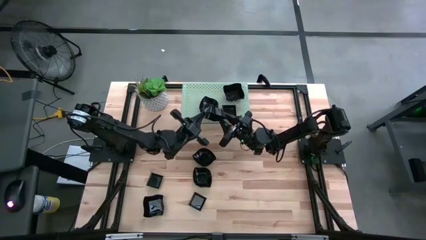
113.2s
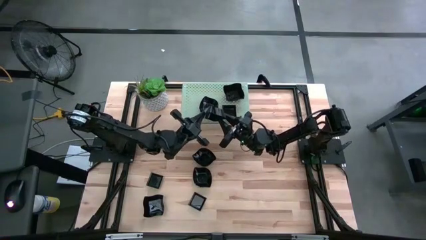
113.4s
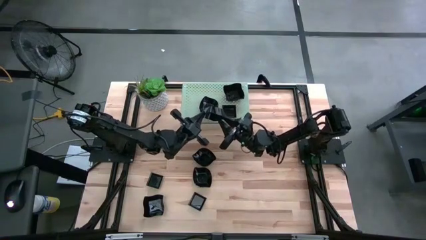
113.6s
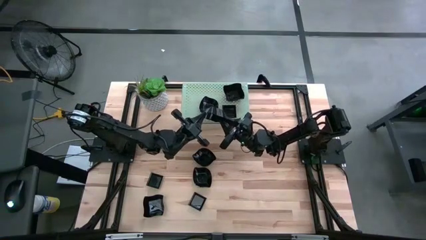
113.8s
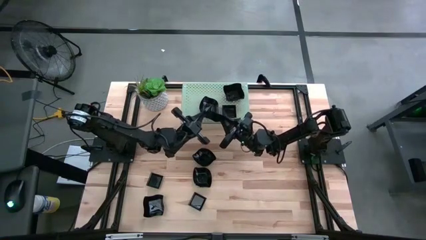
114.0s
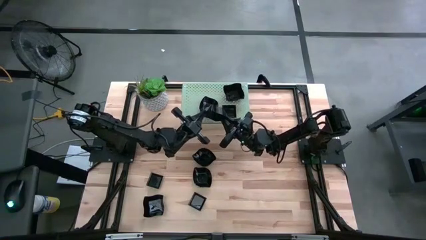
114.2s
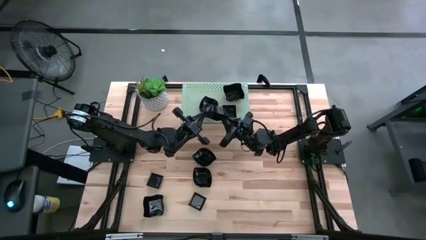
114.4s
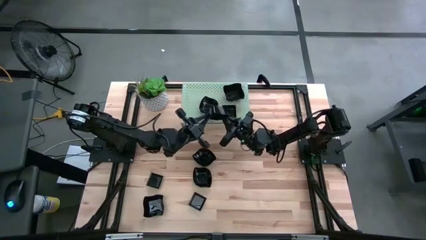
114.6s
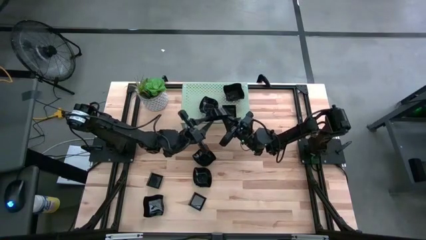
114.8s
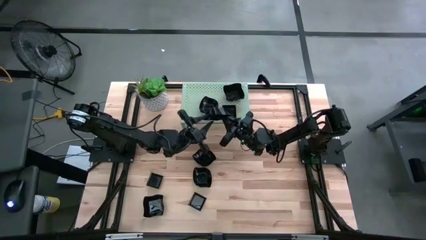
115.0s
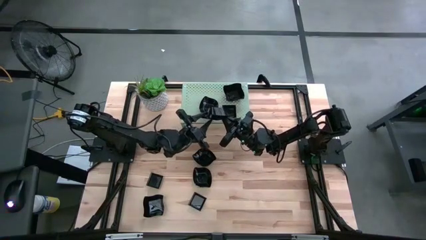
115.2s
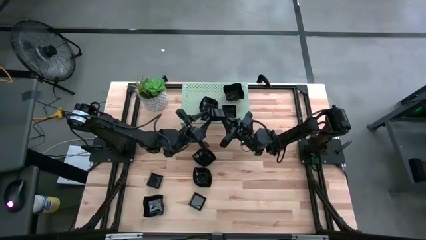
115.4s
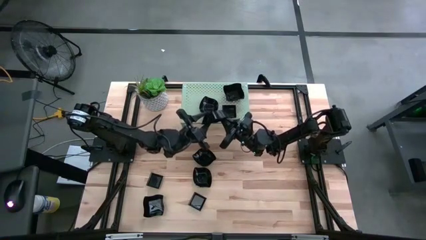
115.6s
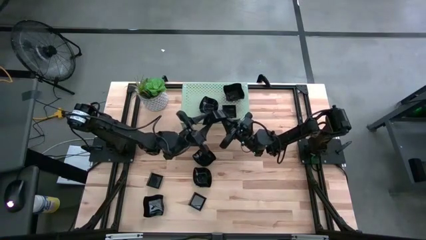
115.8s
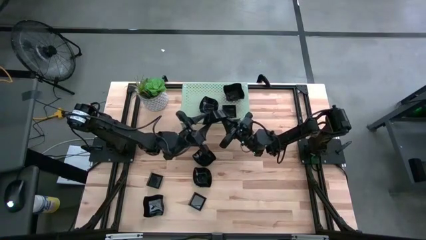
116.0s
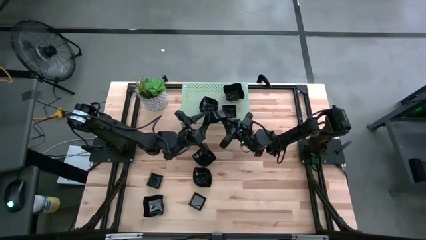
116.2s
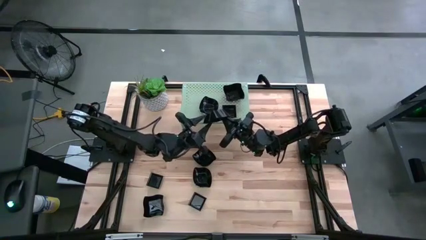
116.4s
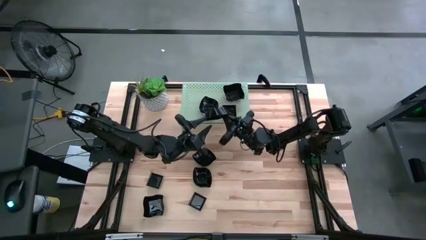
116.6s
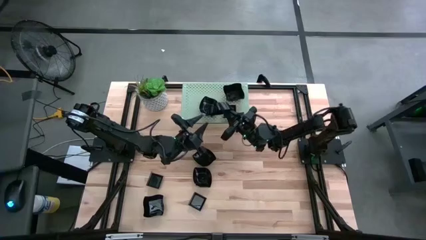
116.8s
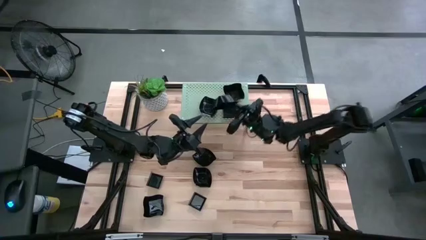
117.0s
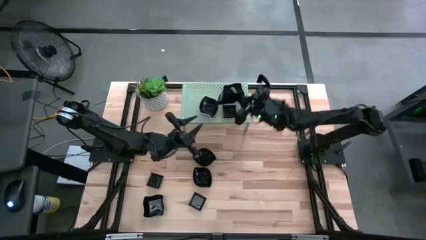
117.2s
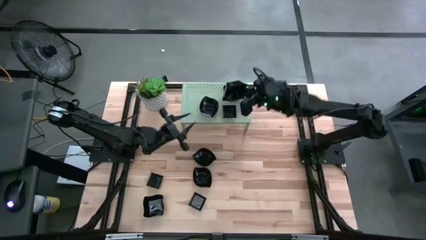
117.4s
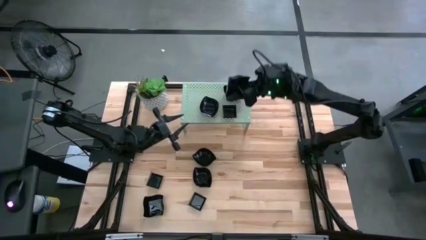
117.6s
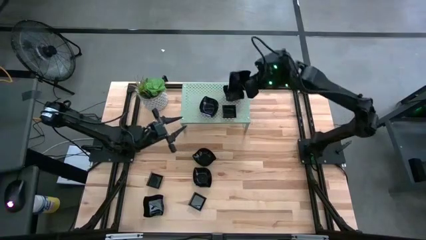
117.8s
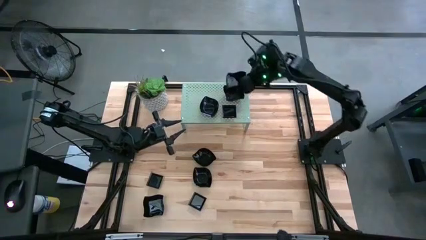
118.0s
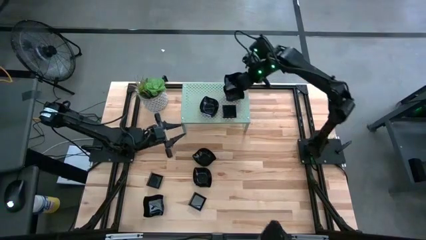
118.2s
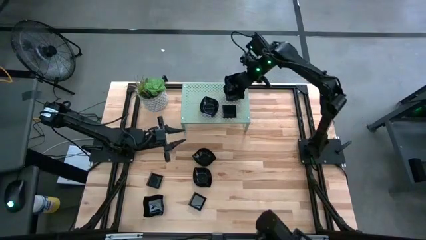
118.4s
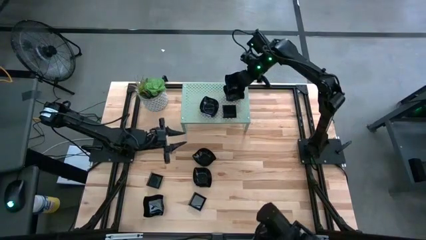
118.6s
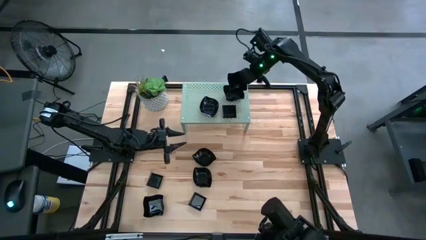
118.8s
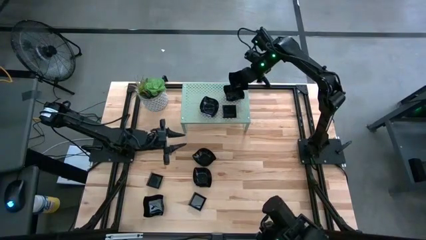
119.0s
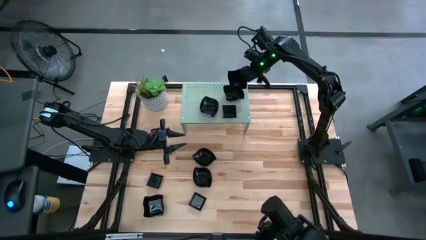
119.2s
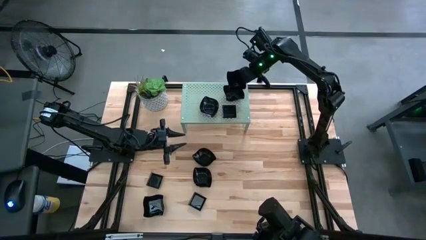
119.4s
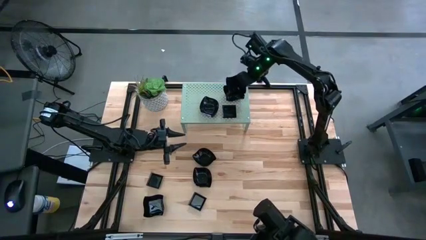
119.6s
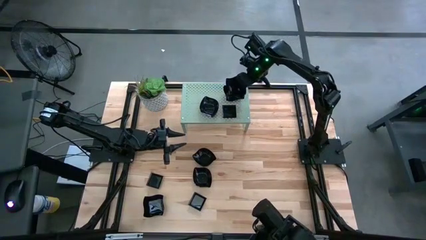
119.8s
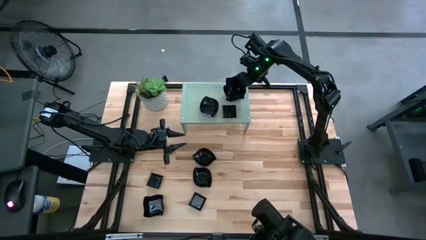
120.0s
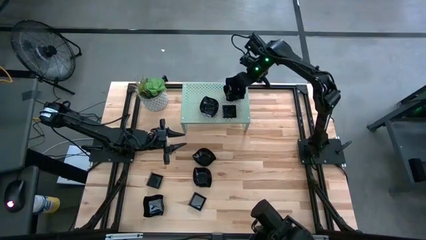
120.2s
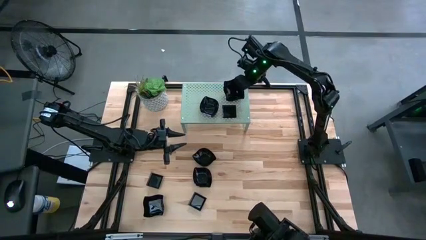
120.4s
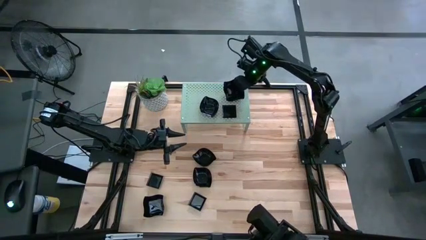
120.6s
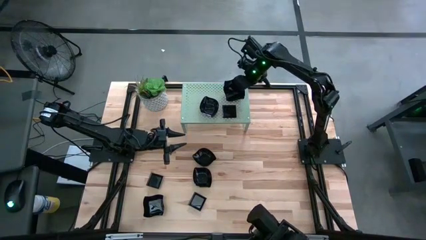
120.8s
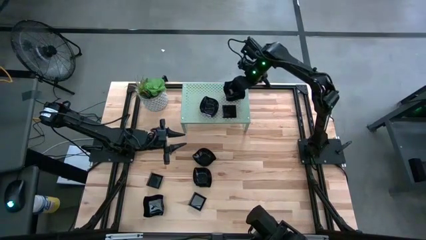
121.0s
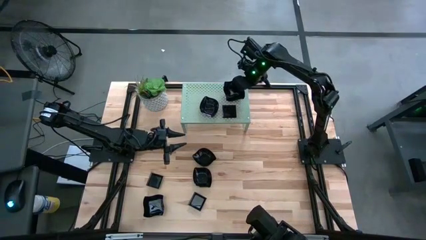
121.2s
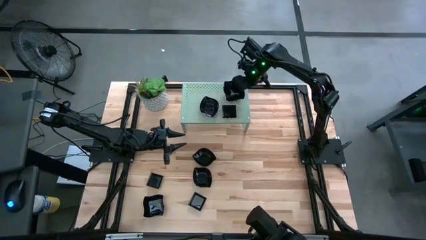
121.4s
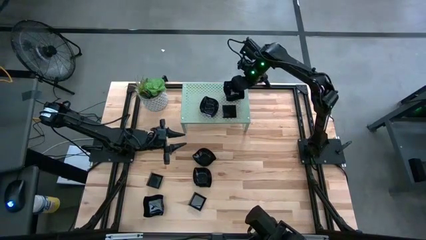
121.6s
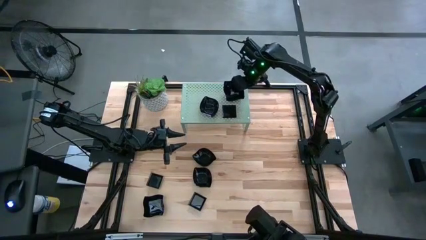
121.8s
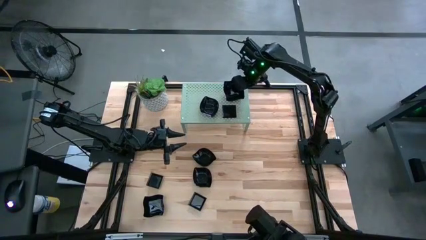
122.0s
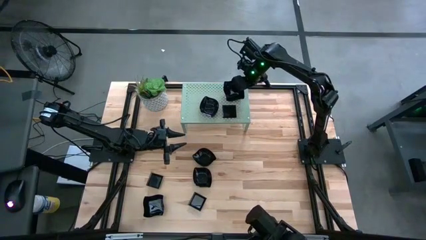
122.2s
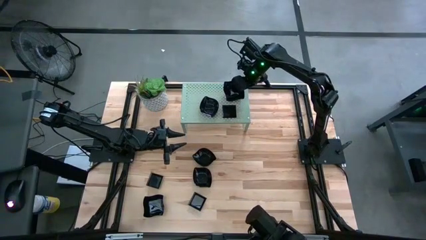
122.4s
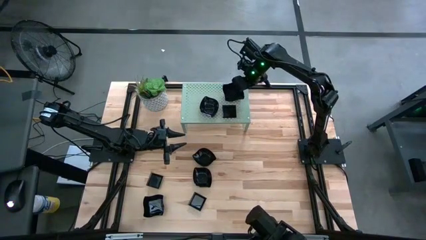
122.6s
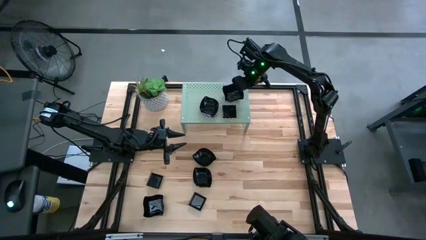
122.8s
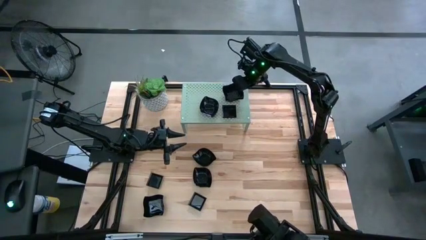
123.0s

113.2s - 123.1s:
Task: Pick & Place Mini shaped plates
Stack the distorted square plate on top of the distorted square plate on the shelf

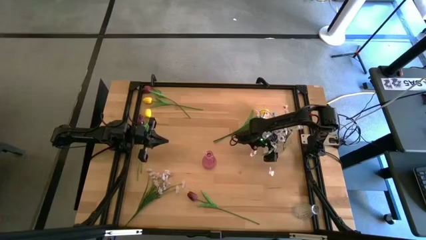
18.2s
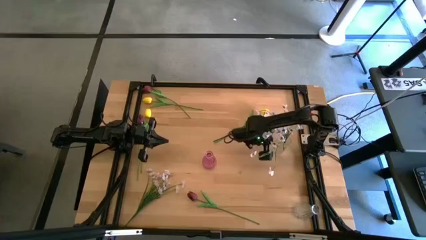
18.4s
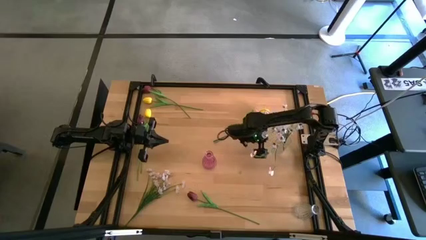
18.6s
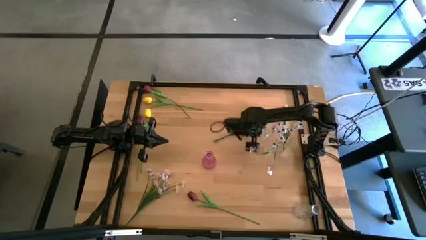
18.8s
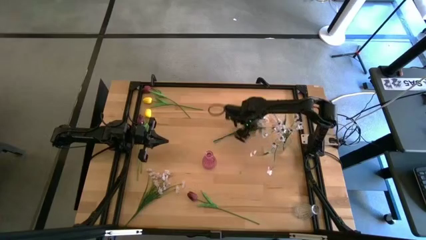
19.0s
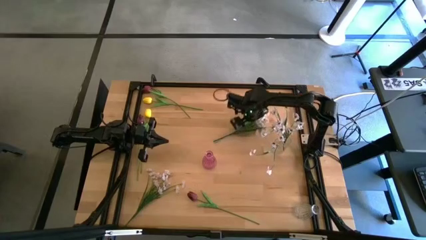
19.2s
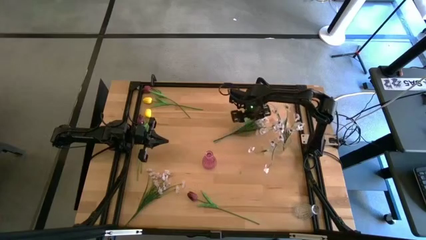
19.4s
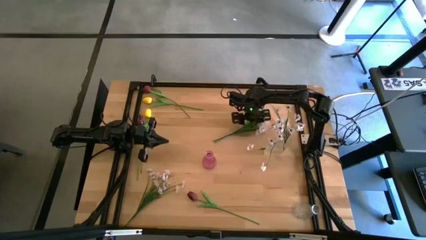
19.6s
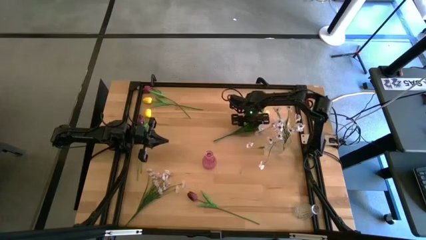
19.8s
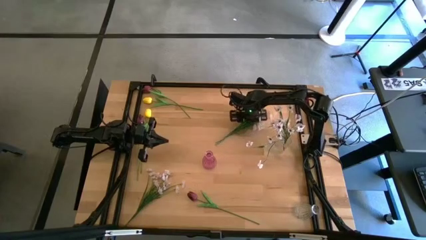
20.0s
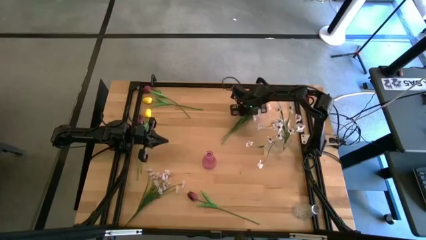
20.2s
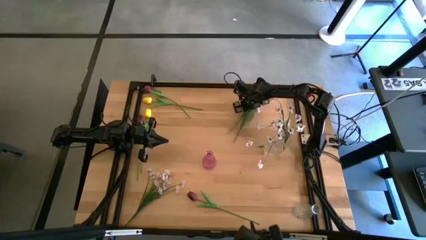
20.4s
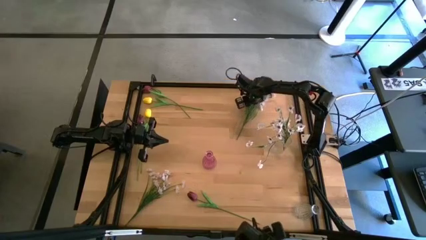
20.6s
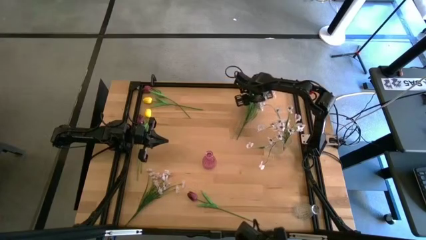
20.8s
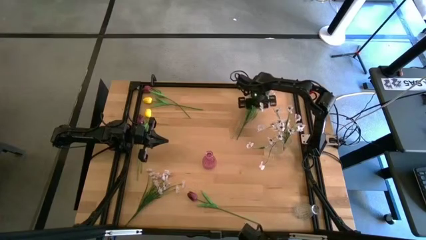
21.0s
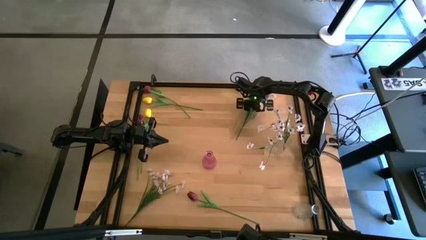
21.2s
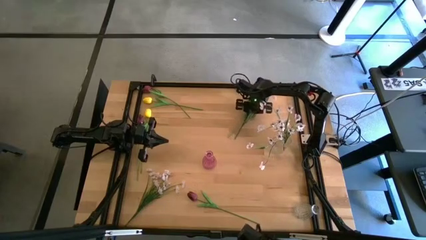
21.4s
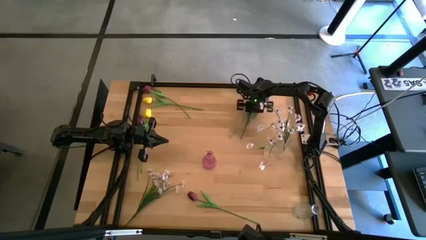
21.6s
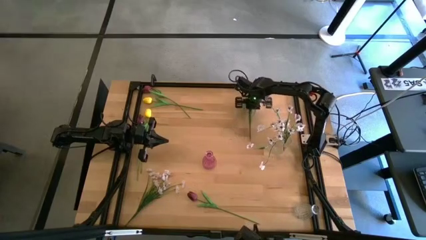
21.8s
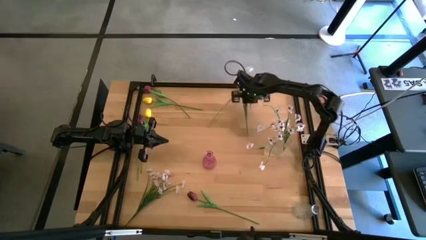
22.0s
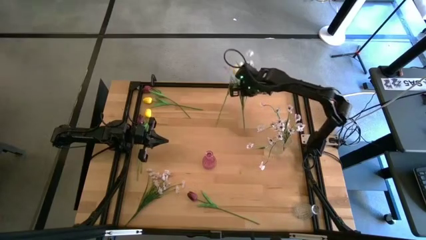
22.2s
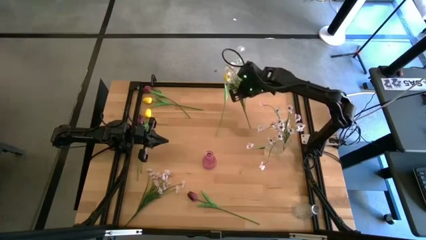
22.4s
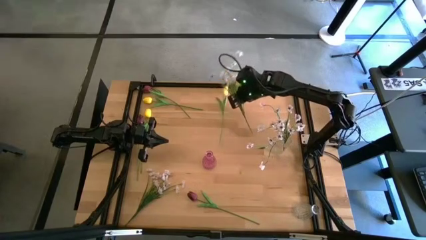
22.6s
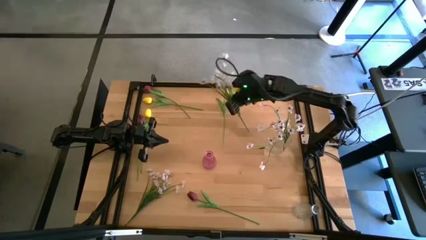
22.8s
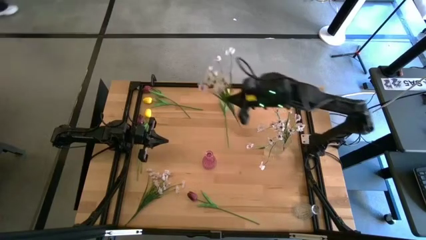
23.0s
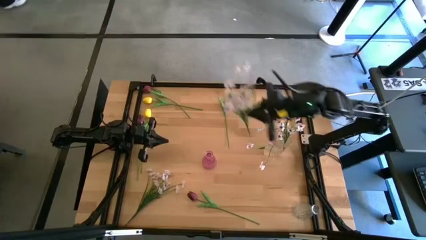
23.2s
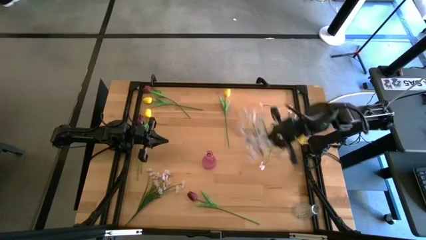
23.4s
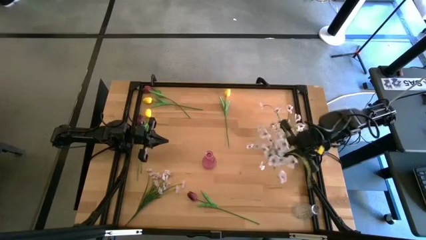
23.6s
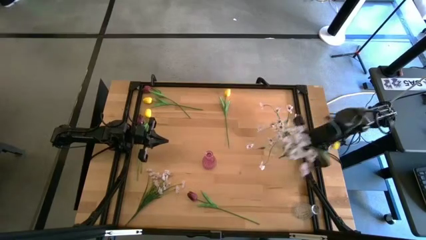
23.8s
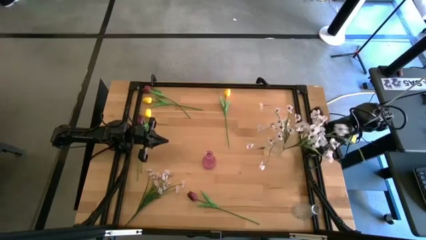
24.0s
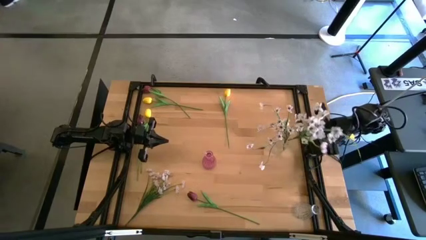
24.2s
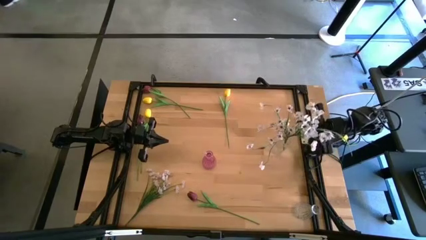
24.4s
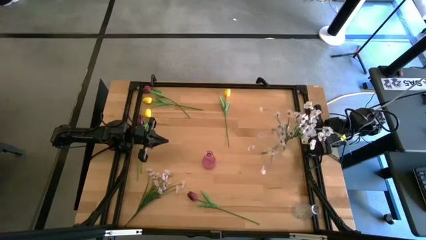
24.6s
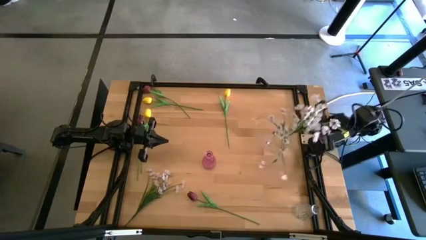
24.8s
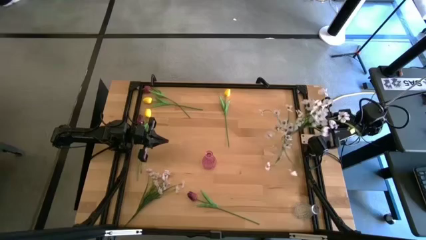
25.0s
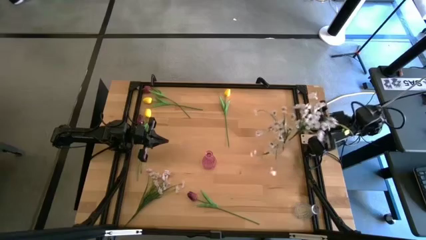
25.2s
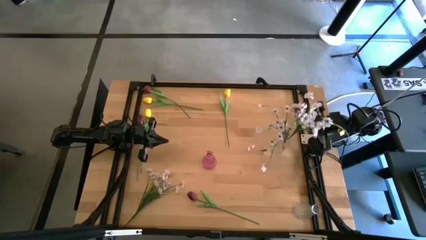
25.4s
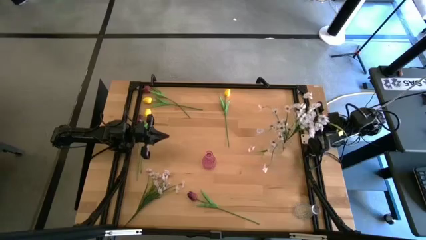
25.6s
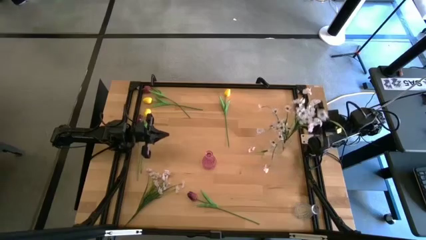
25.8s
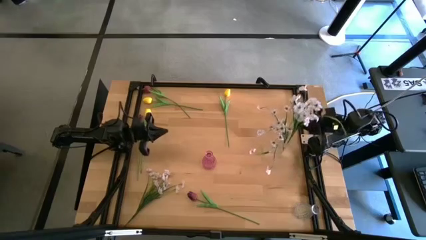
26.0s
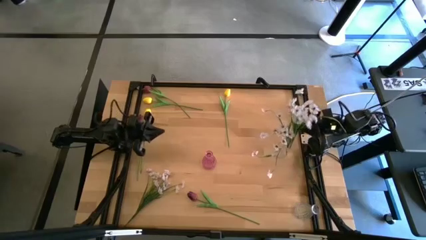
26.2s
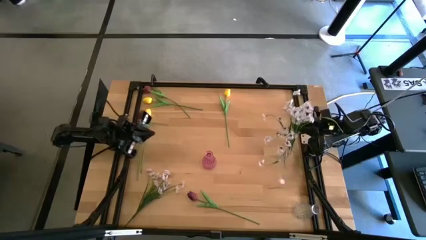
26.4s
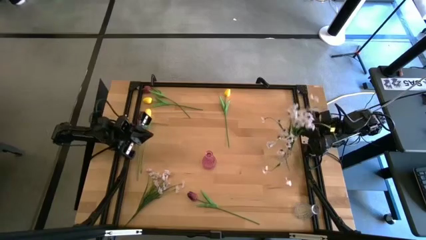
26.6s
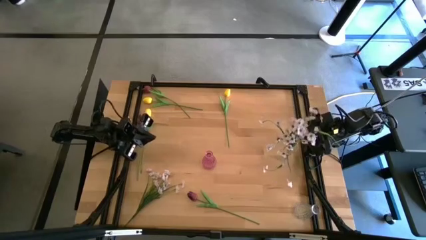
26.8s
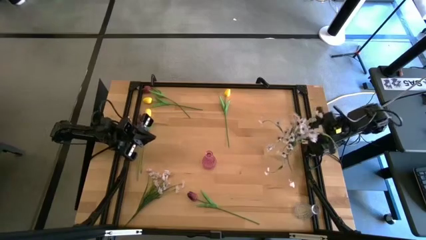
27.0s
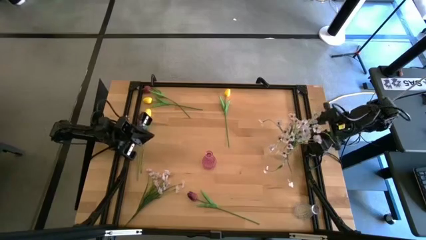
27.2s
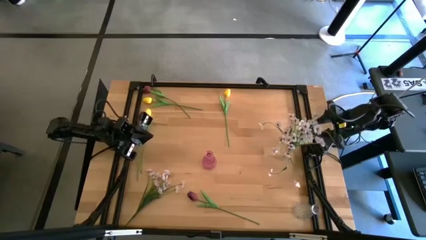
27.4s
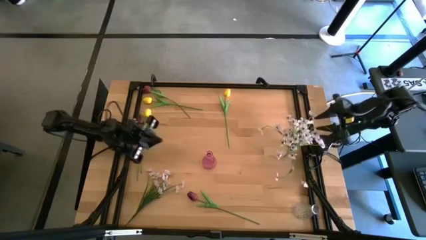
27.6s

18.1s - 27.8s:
Task: Sort flowers into vase by color
Put the top white flowers into the top transparent vase
